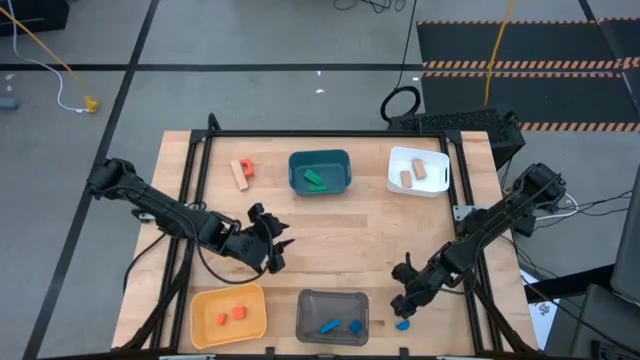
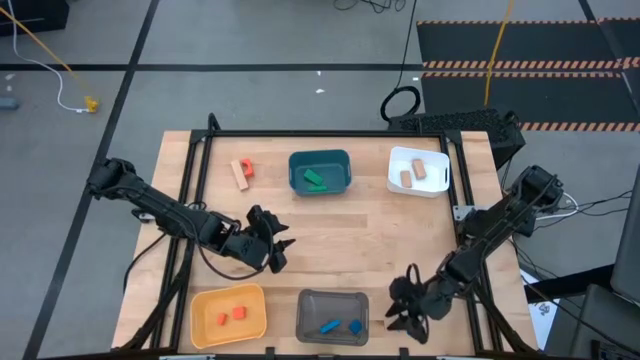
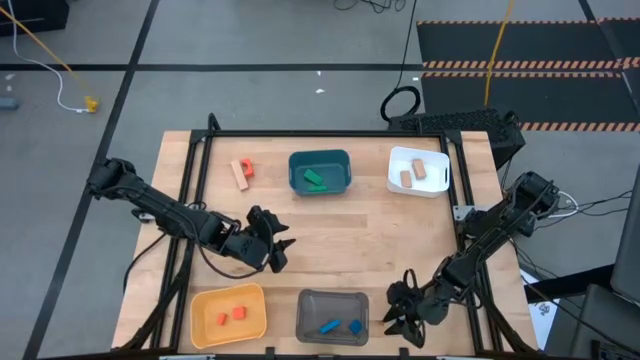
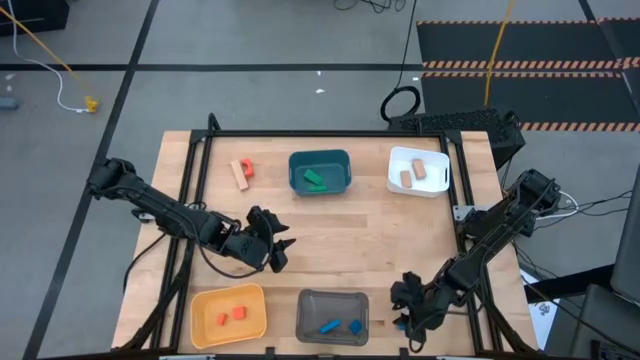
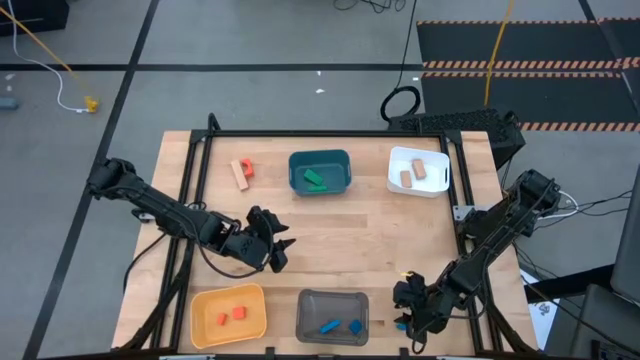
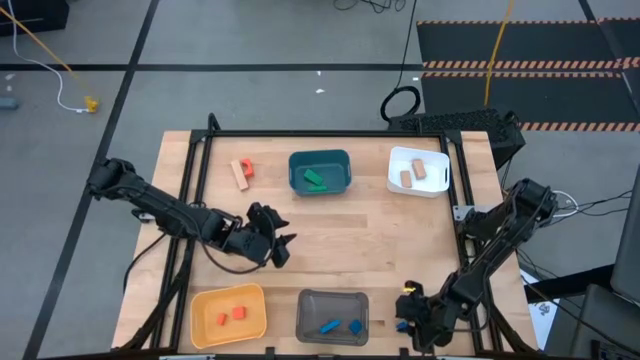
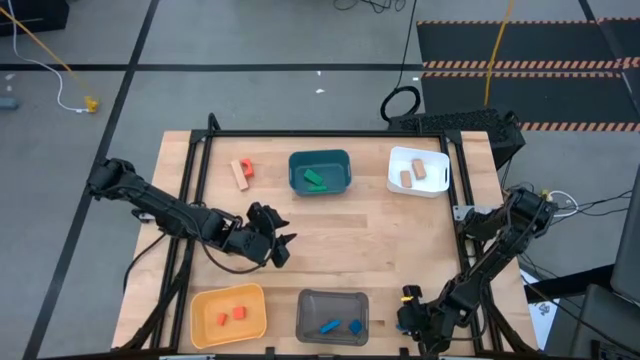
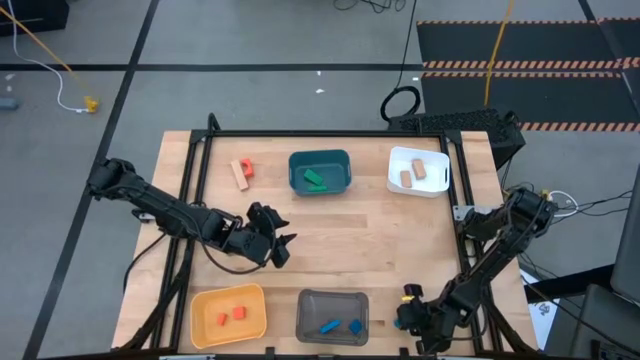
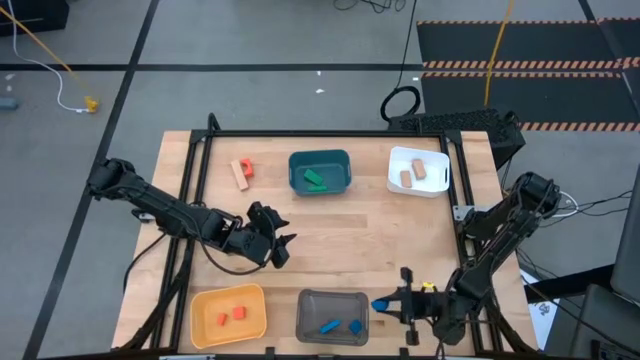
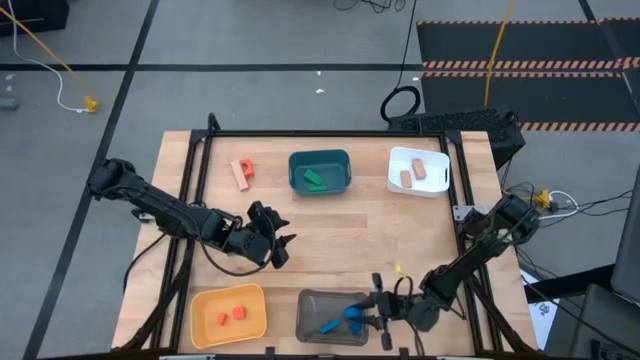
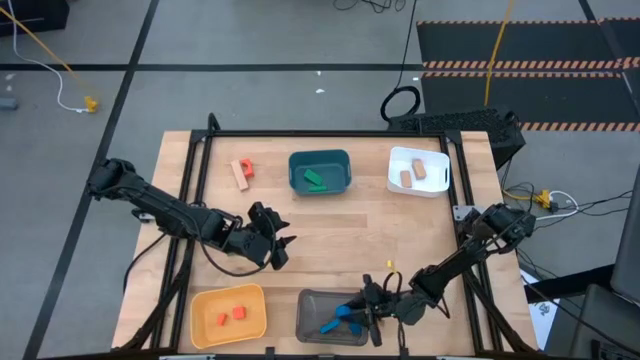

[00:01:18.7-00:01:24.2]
Task: Sort & place blocks by color
Put the blue block into the black bin

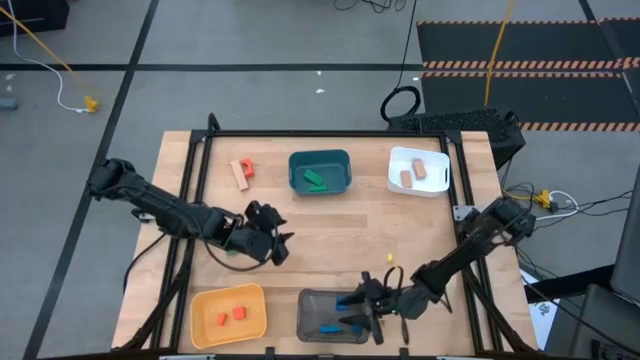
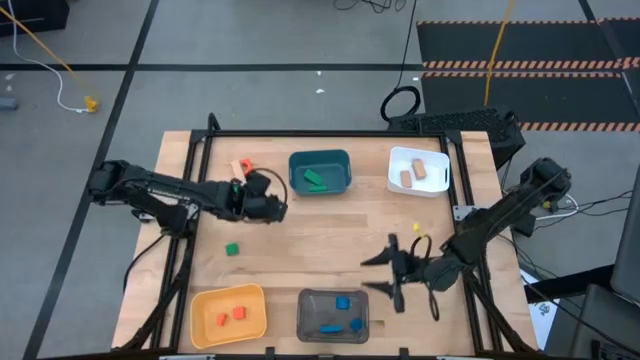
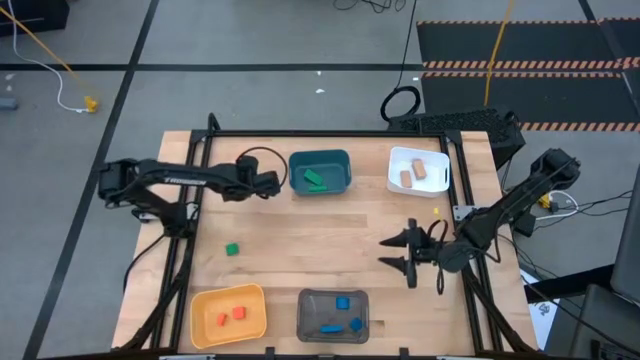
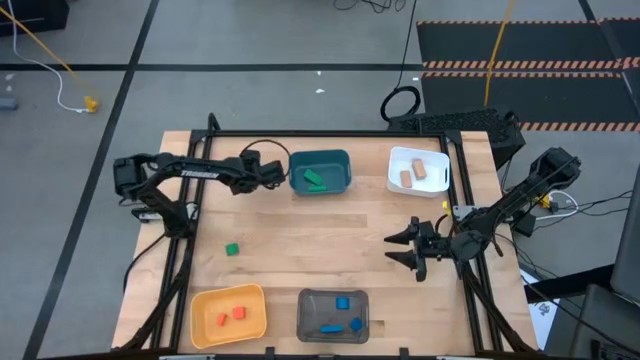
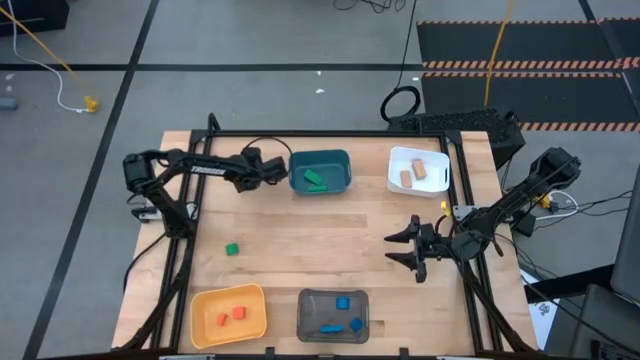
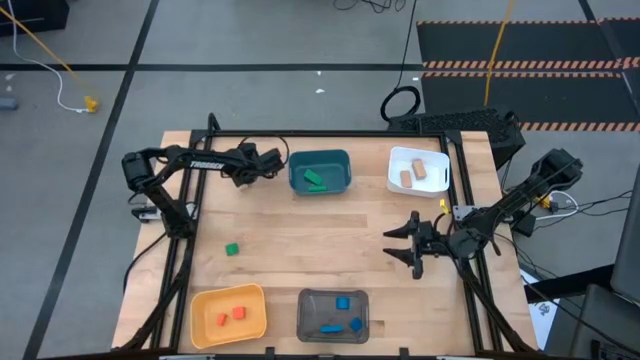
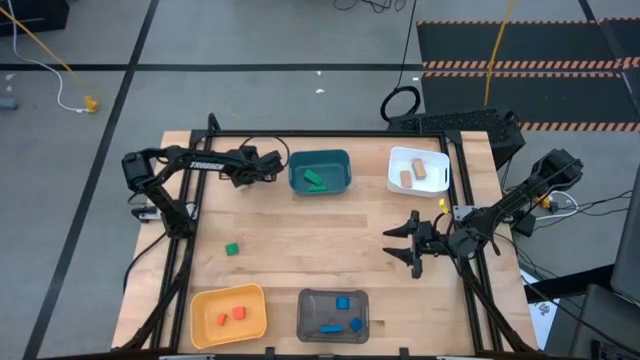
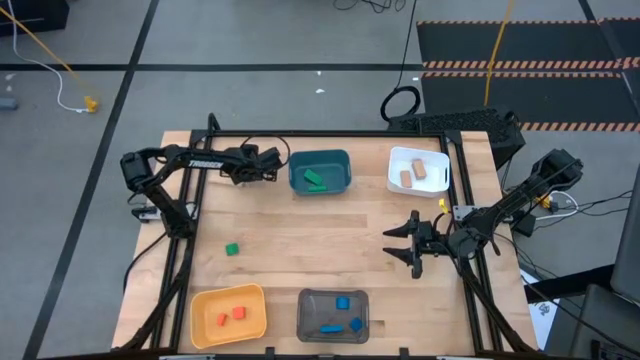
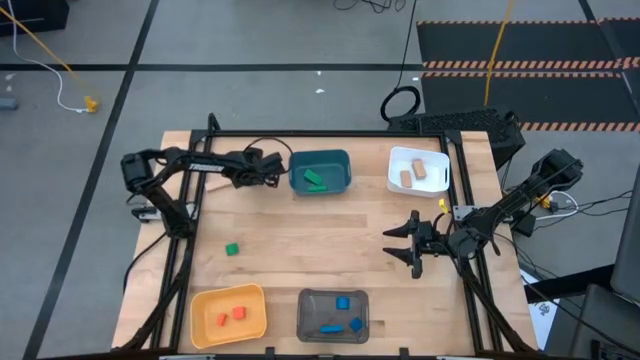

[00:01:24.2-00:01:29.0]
Put the orange block into the yellow bin

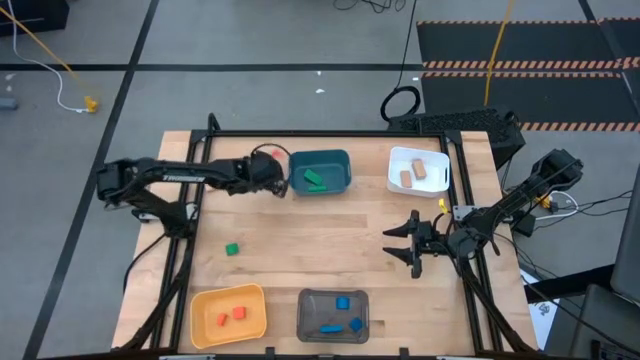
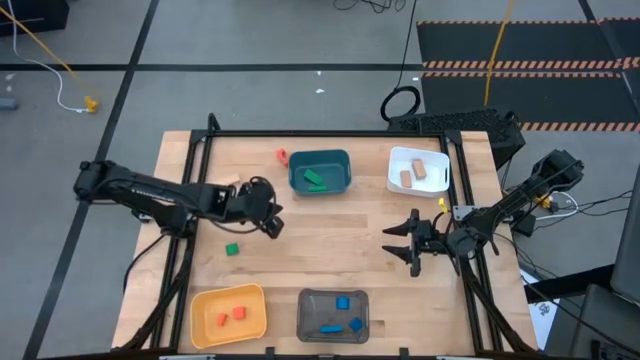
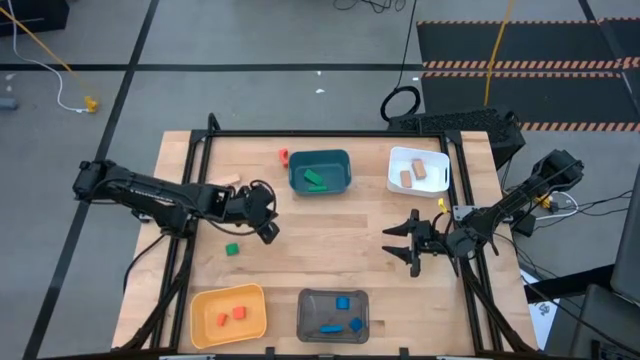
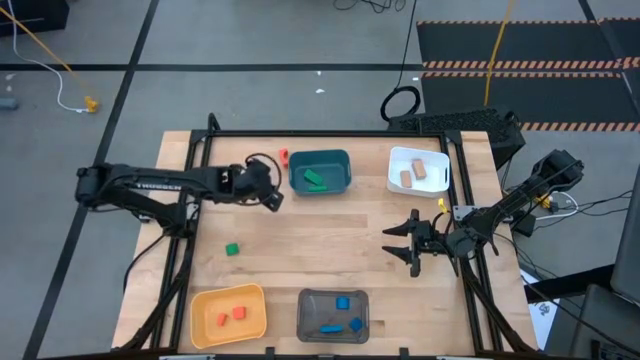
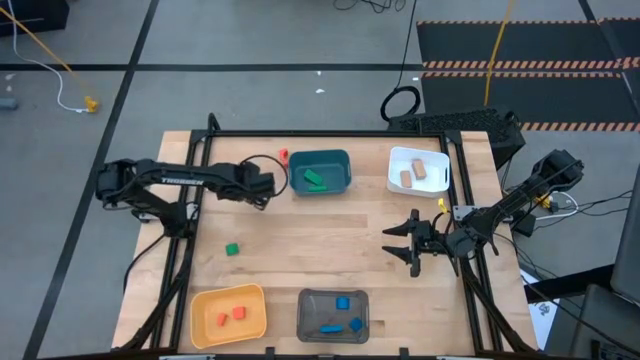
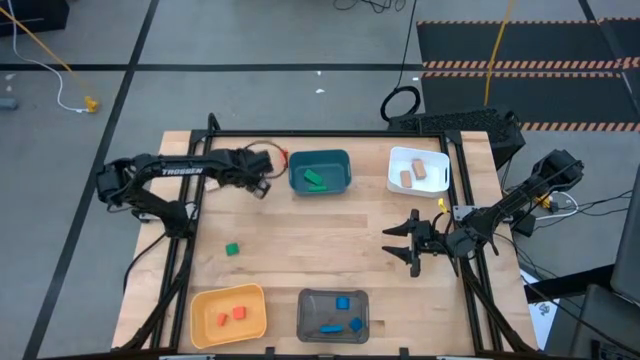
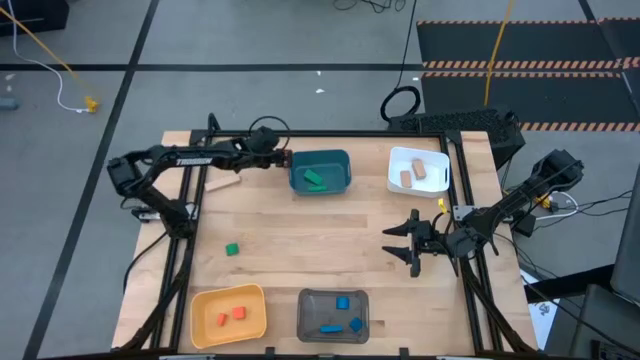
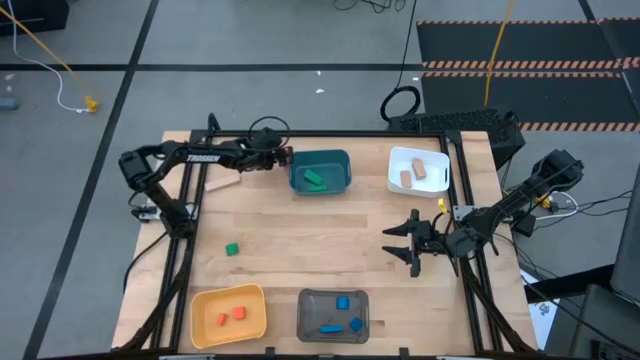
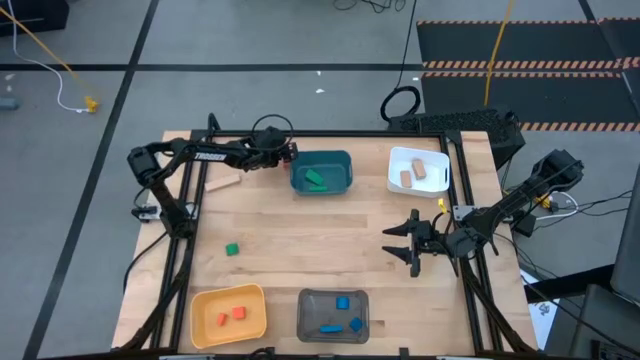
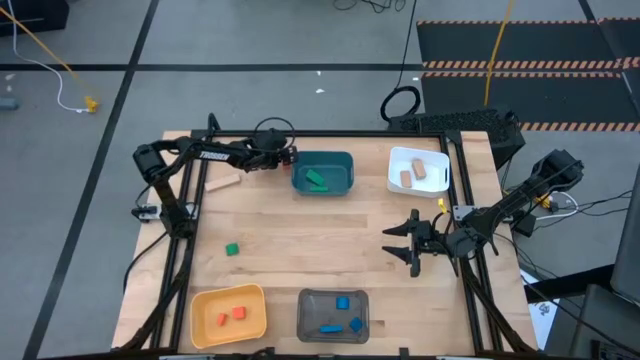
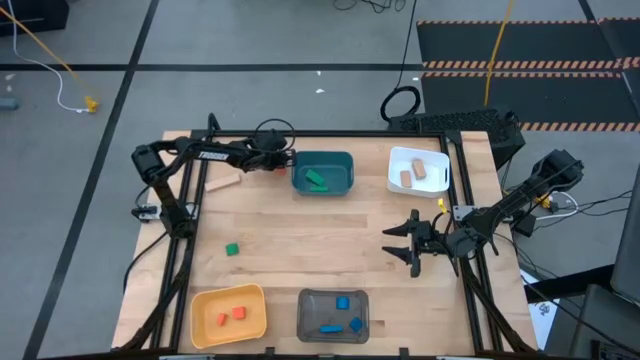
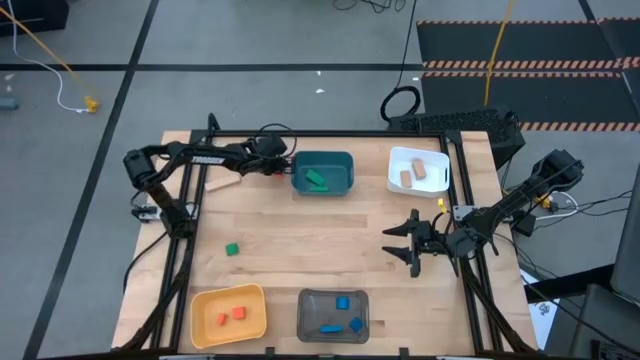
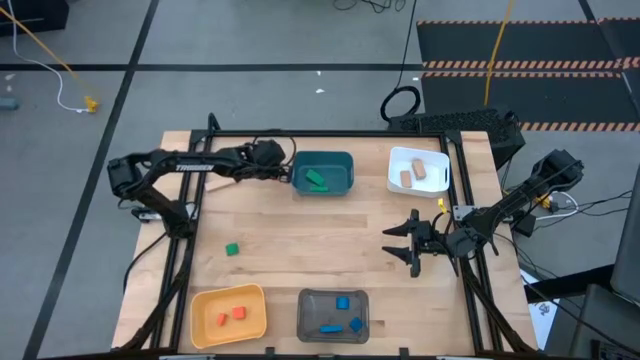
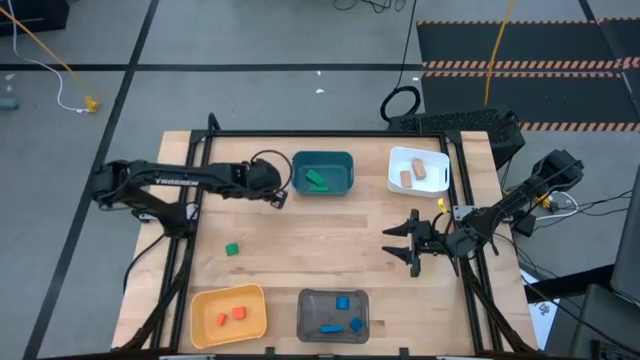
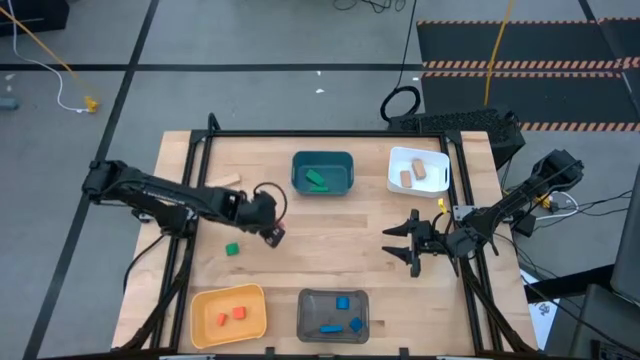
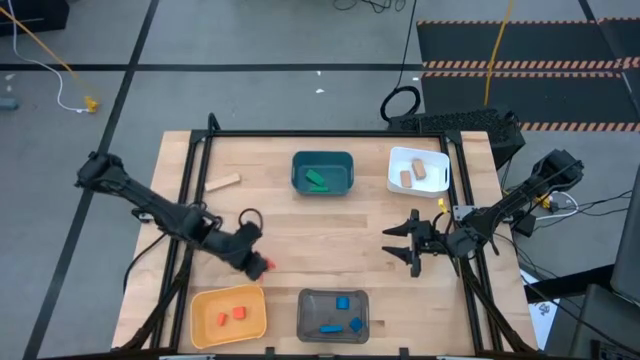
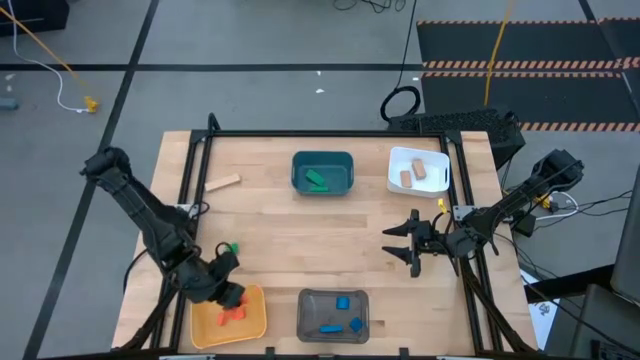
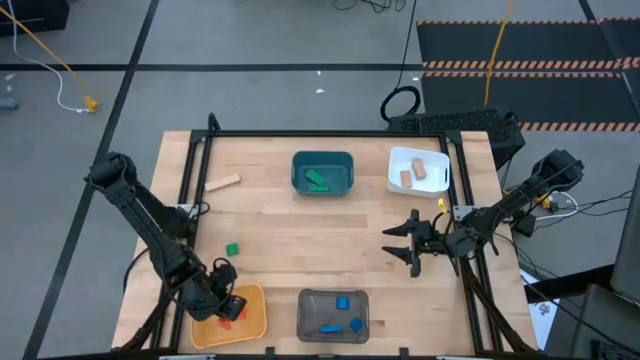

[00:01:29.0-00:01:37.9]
Put the orange block into the yellow bin
